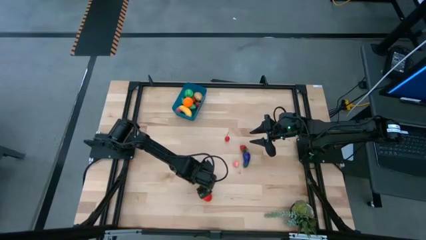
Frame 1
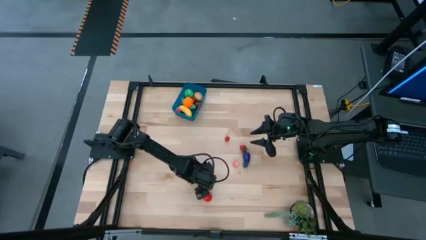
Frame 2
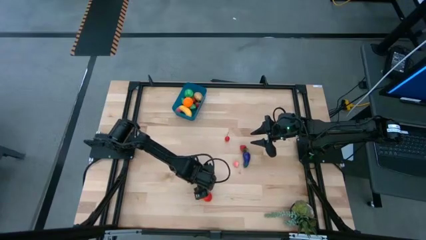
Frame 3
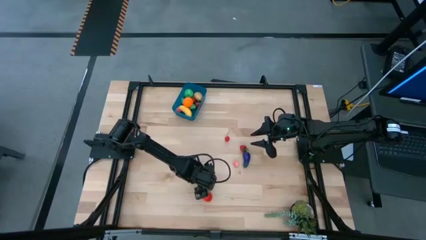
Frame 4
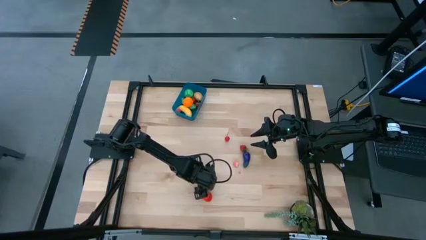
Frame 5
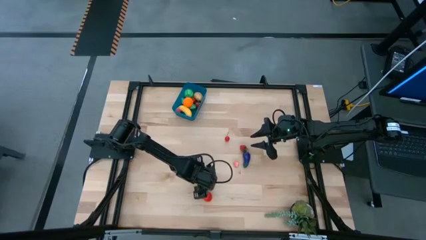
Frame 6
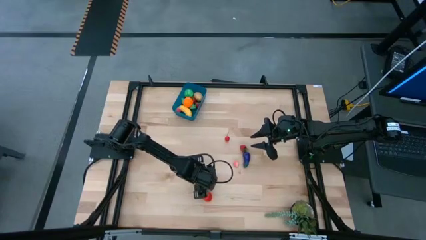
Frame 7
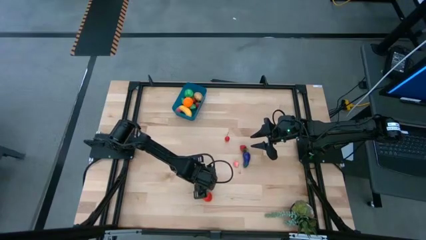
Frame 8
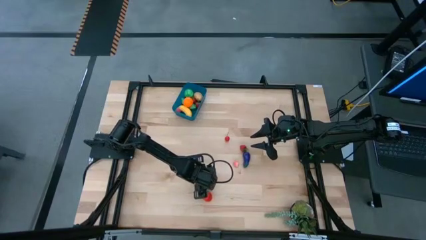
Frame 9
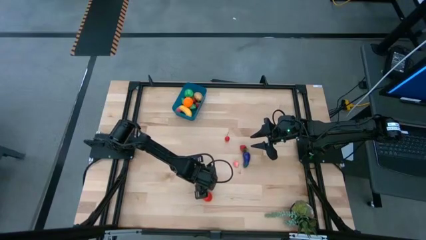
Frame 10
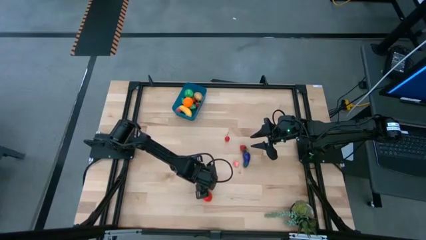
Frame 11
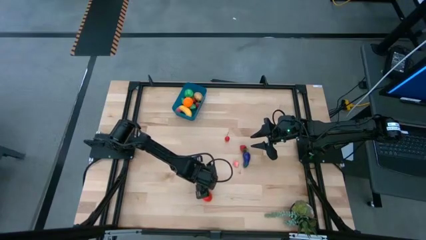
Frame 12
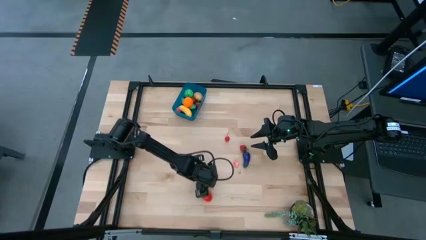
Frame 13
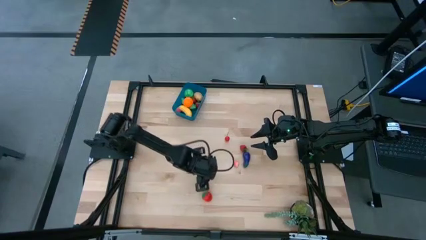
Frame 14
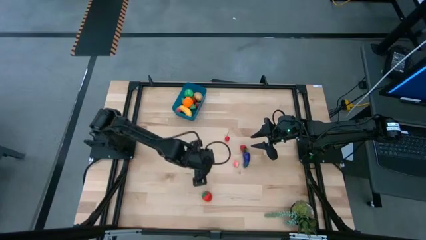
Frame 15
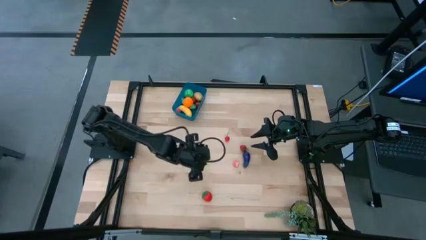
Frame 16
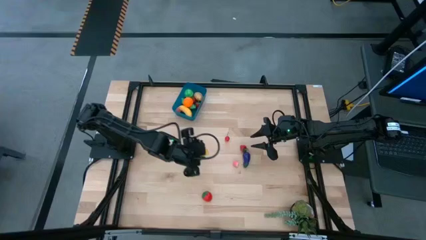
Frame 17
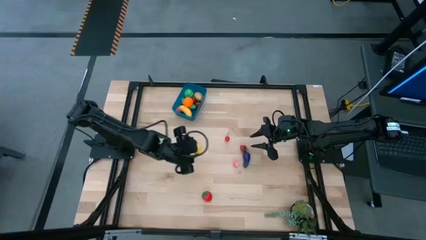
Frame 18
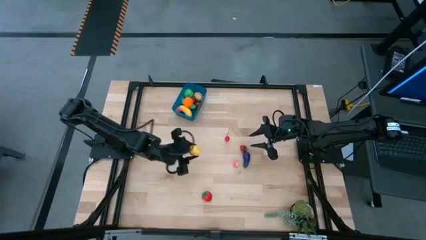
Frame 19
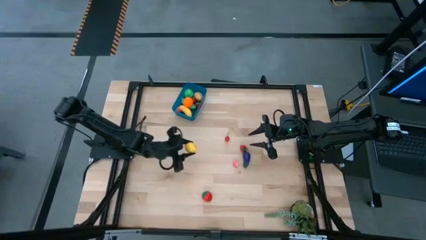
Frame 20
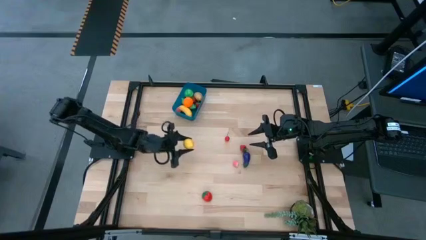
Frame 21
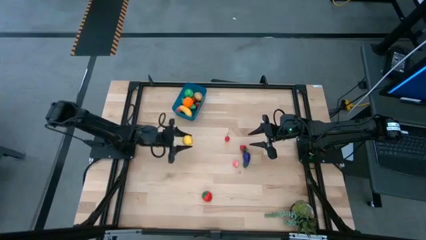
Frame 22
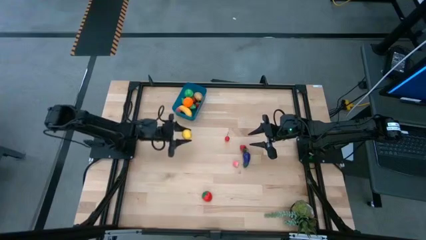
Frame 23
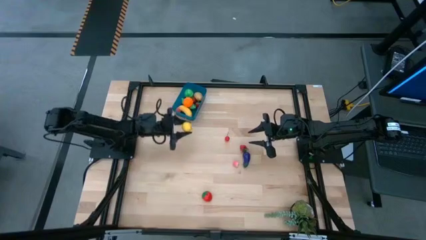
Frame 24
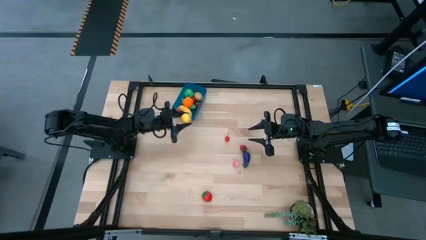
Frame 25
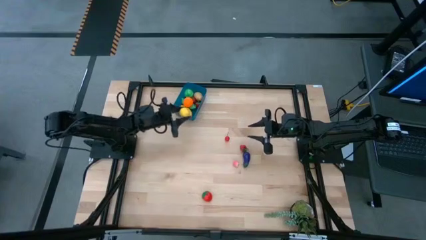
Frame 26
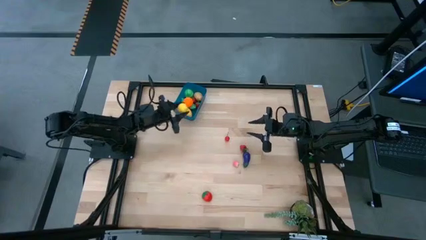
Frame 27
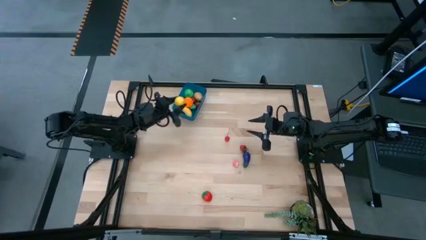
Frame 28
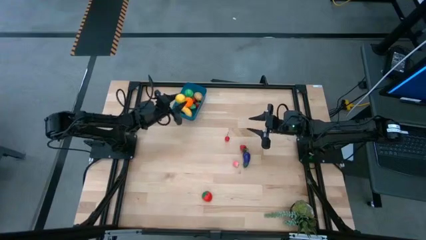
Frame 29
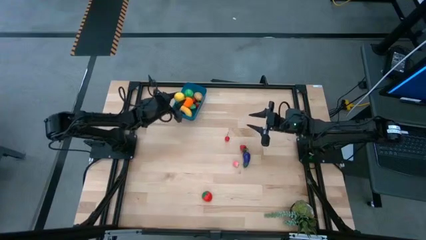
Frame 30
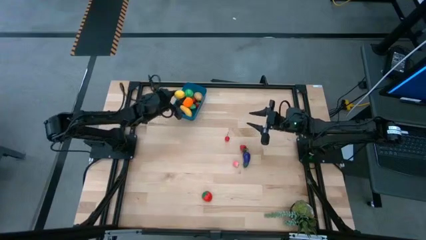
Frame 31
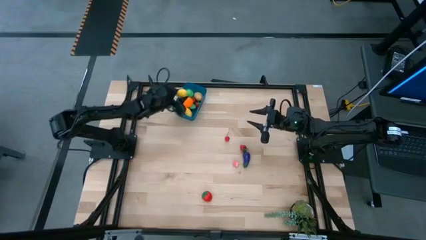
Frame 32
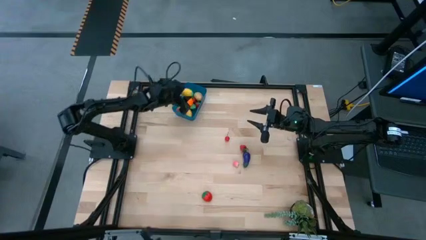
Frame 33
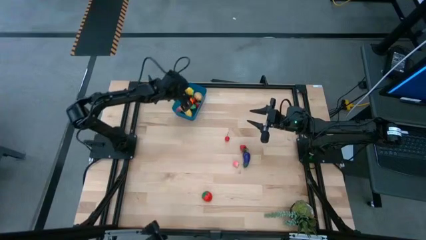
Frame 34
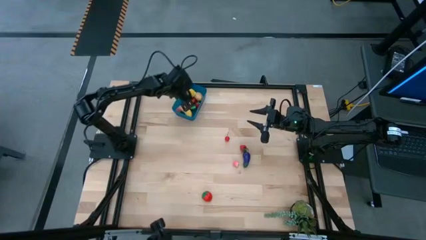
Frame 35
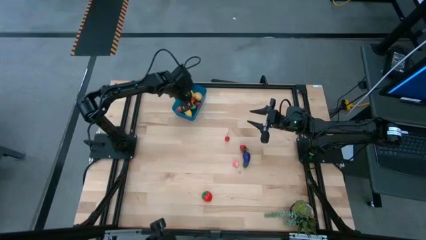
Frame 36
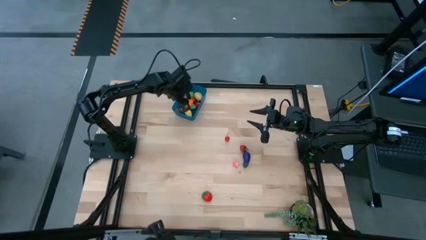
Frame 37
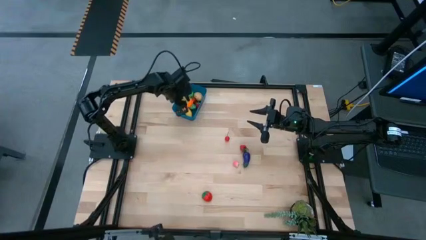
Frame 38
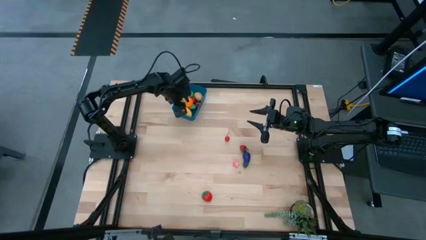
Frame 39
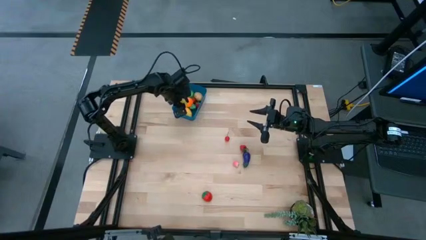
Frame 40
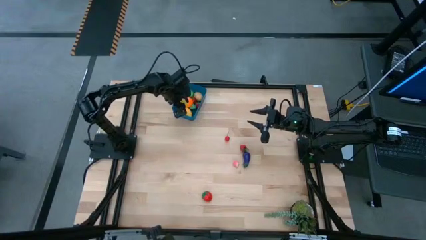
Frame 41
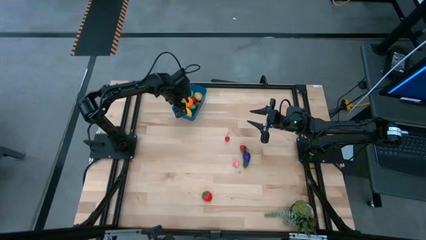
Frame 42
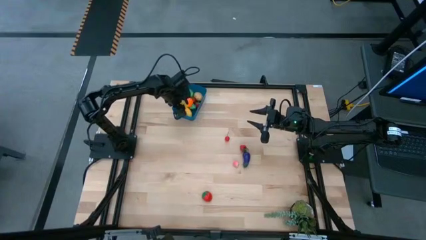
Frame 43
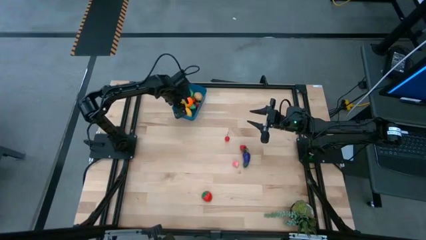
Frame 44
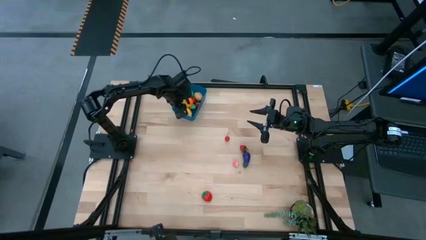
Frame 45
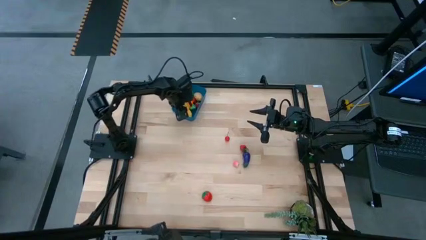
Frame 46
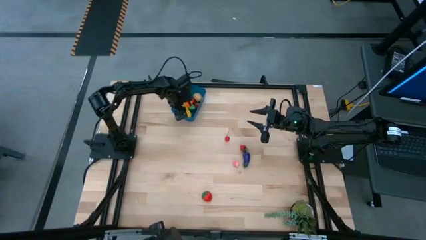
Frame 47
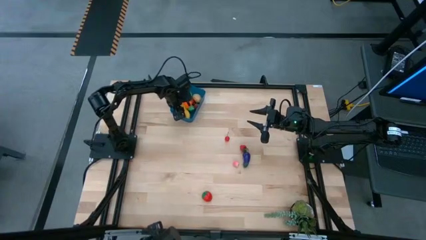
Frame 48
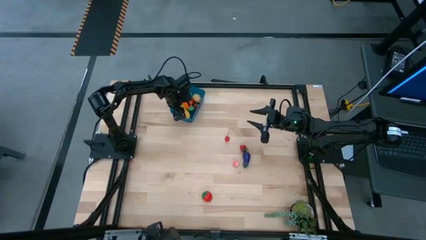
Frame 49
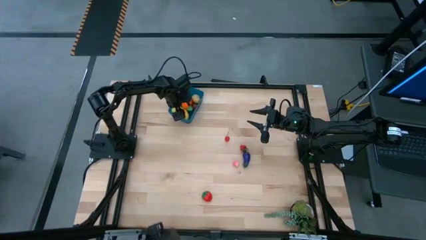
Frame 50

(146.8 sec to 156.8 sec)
Task: Pick and placing Produce into tupperware
Put the yellow lemon into the blue bin

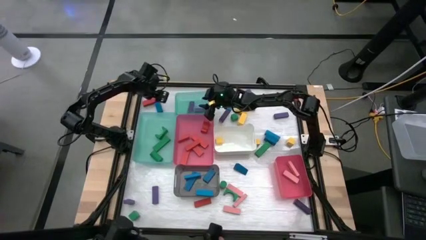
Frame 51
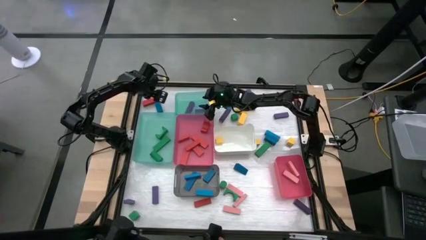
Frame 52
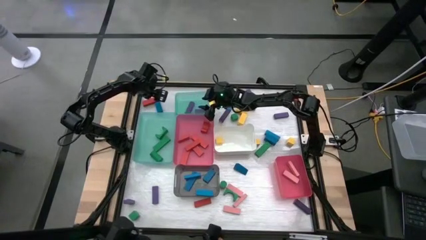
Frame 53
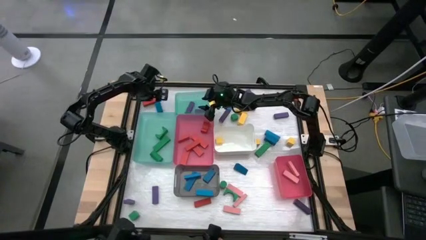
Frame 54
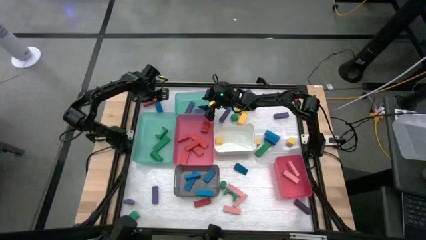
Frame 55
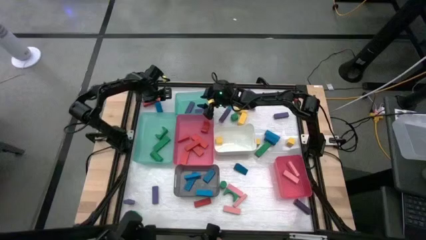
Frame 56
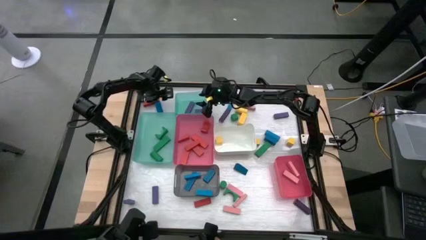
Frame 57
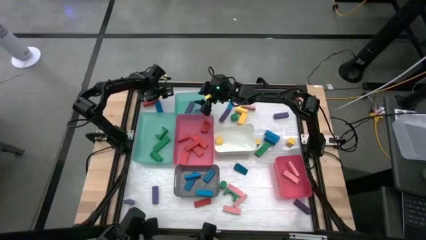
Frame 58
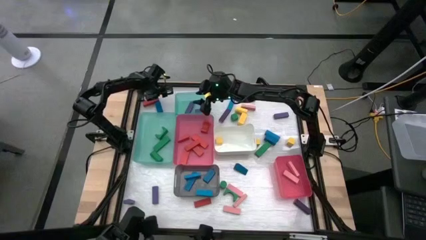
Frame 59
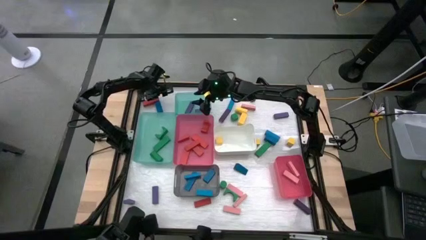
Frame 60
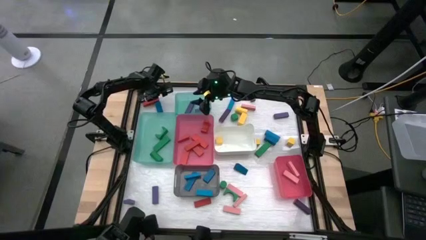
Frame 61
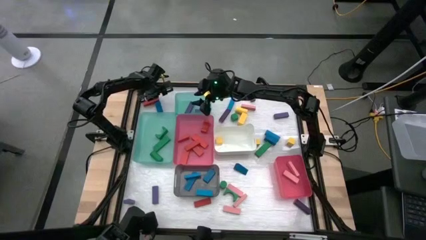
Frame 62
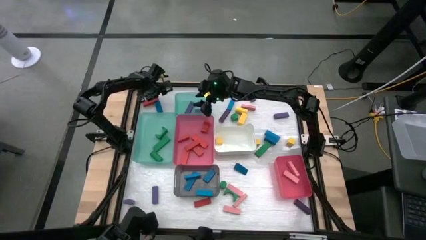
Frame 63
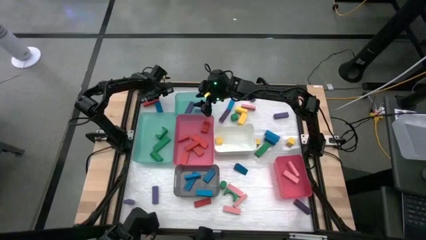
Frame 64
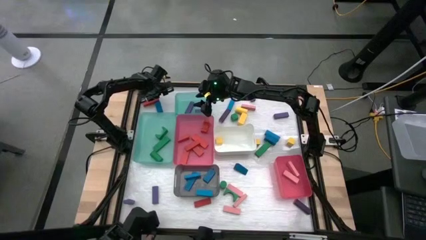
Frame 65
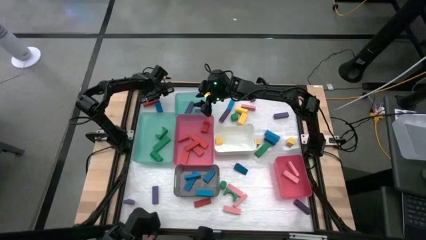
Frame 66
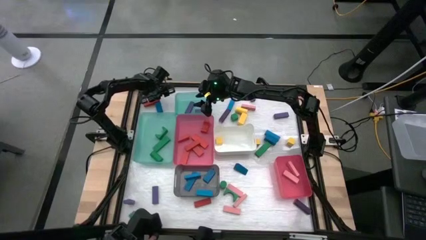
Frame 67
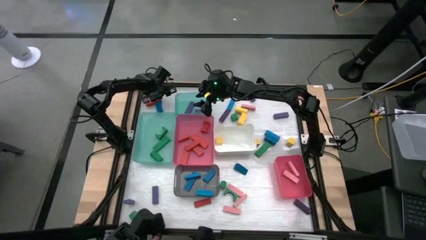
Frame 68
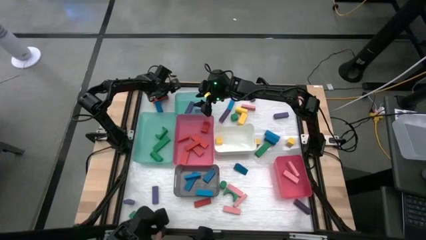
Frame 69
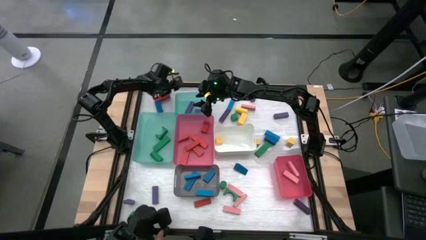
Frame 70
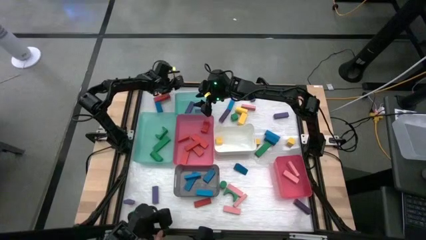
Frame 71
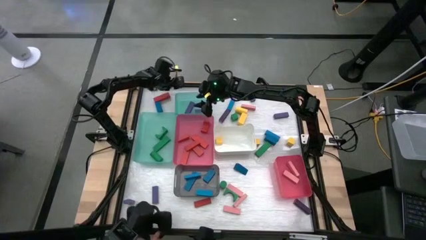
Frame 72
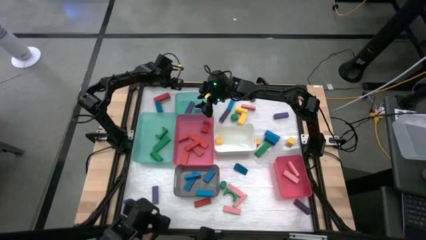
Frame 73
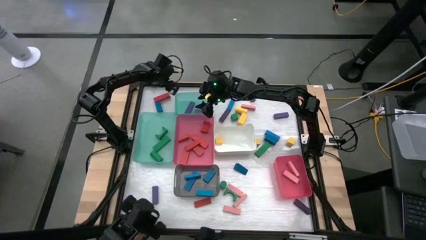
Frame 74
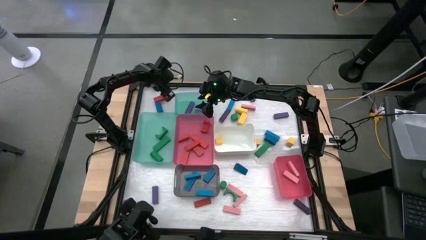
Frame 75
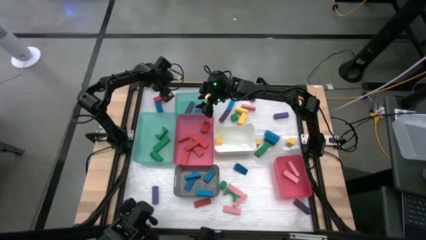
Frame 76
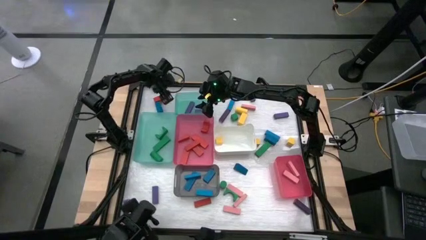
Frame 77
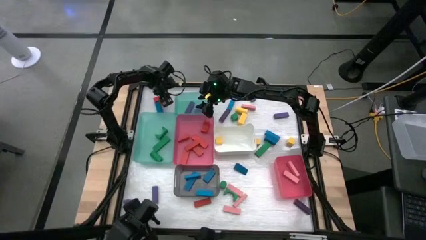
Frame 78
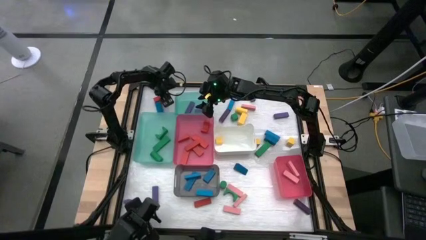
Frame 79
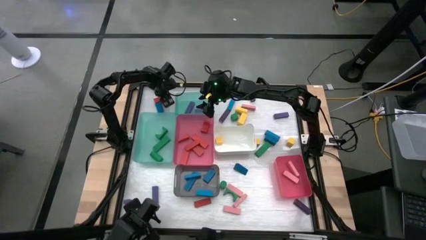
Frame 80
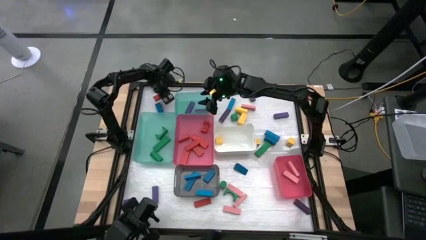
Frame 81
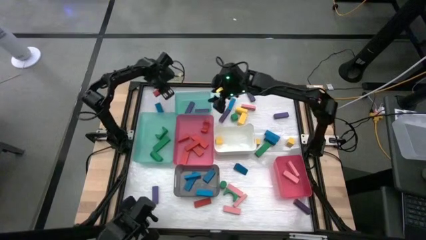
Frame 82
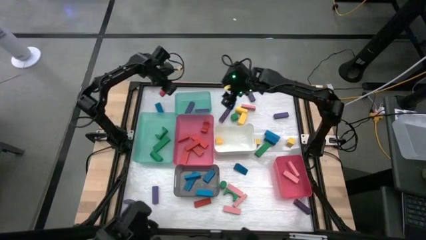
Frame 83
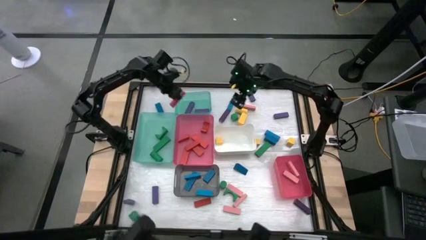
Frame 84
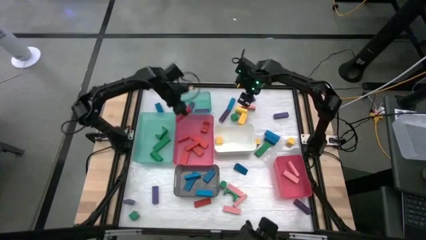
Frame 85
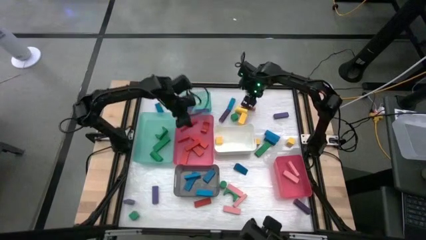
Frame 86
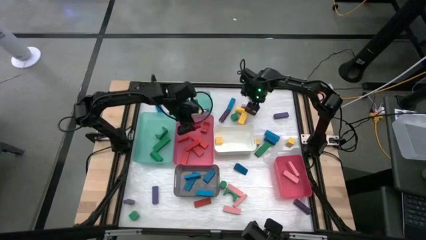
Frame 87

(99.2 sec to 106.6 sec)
Task: Sort blocks
Put the red block into the top pink bin
